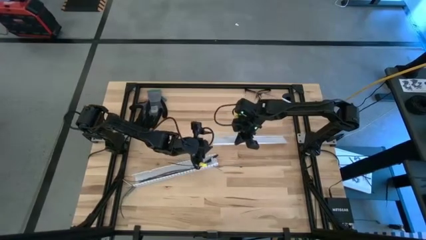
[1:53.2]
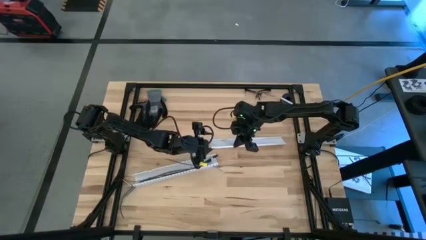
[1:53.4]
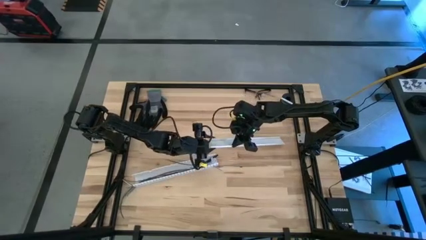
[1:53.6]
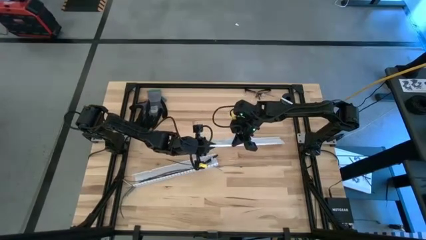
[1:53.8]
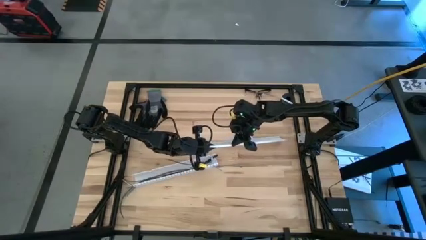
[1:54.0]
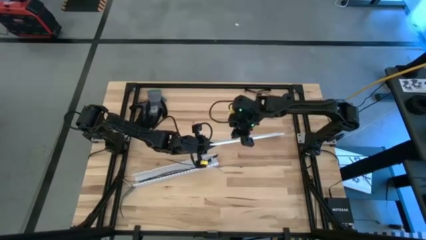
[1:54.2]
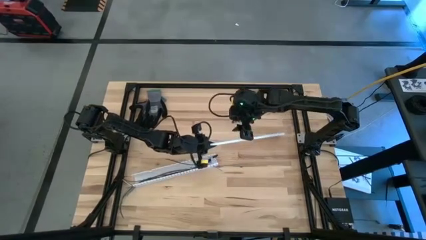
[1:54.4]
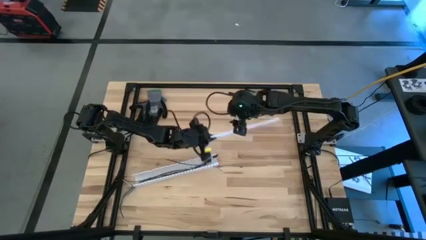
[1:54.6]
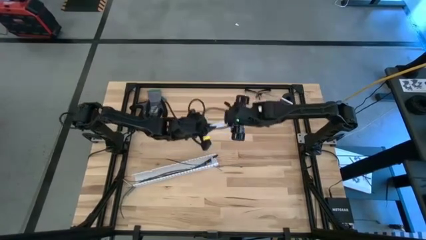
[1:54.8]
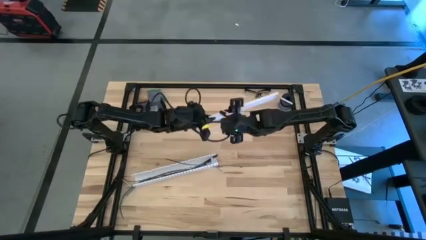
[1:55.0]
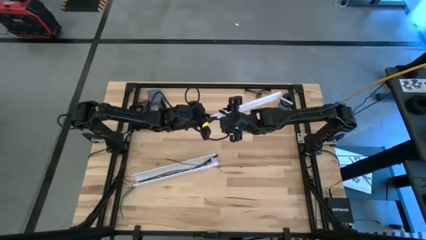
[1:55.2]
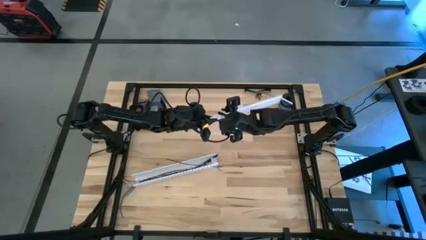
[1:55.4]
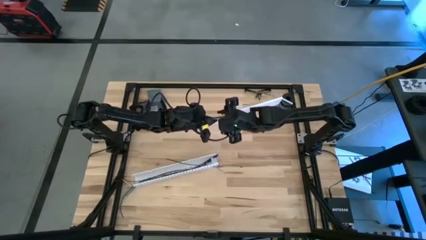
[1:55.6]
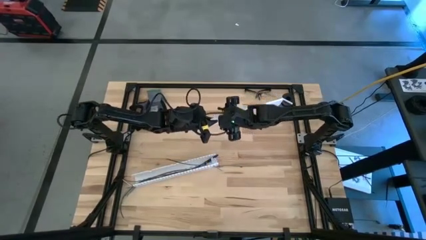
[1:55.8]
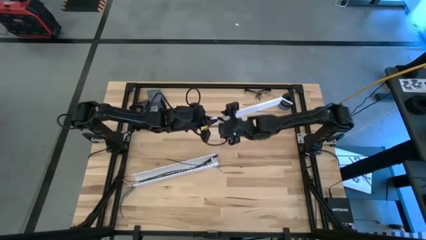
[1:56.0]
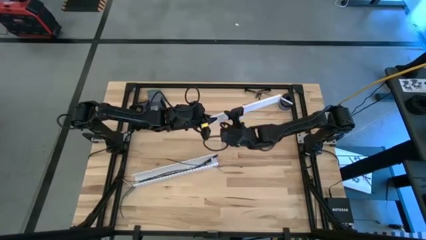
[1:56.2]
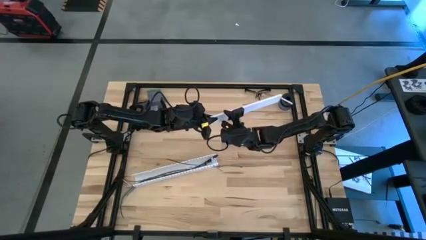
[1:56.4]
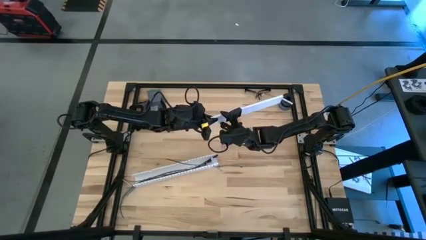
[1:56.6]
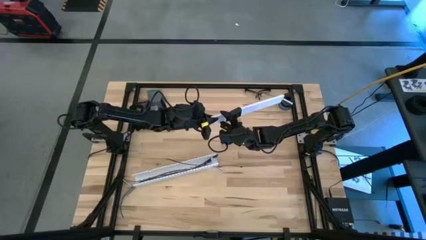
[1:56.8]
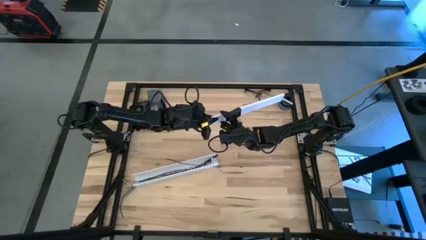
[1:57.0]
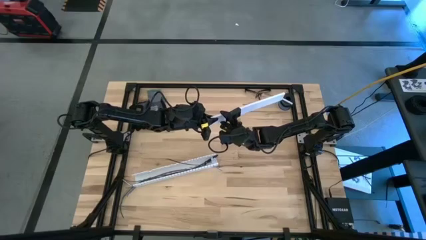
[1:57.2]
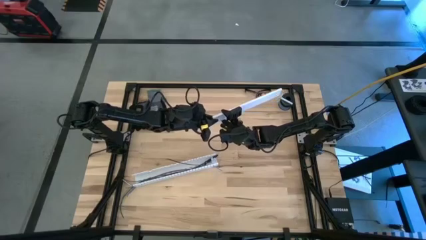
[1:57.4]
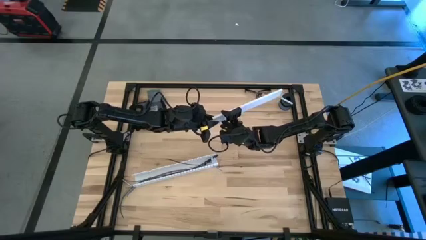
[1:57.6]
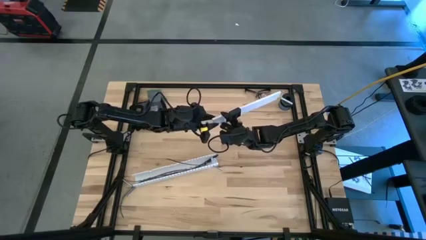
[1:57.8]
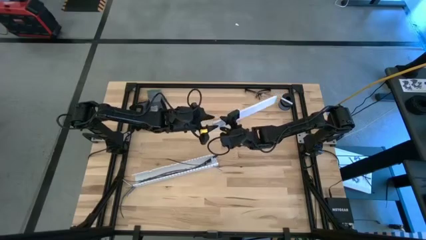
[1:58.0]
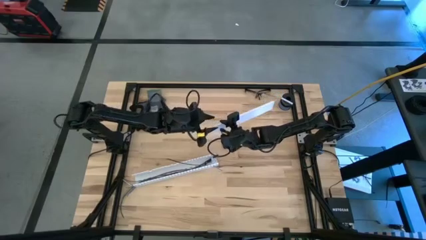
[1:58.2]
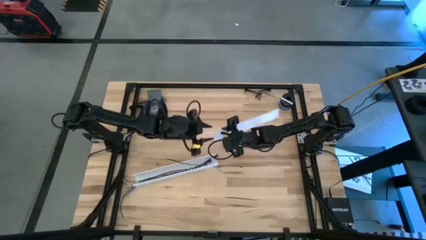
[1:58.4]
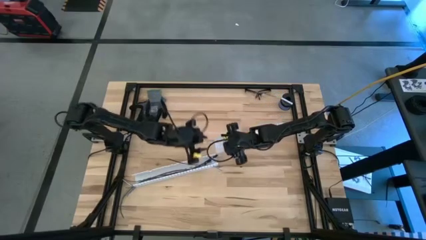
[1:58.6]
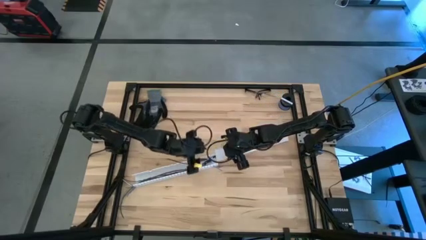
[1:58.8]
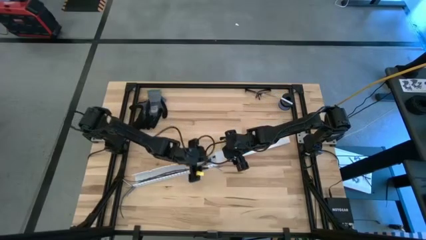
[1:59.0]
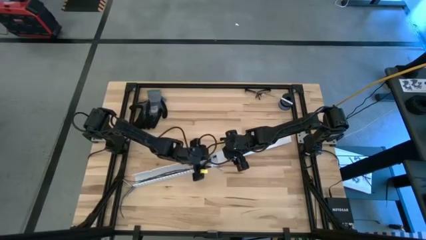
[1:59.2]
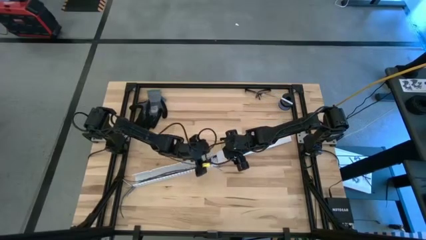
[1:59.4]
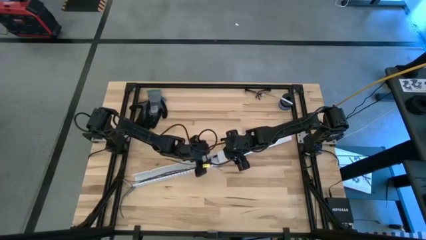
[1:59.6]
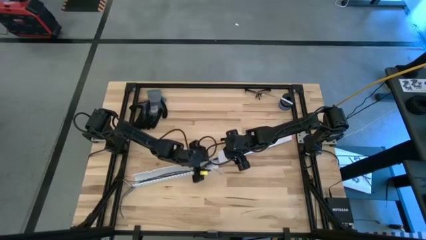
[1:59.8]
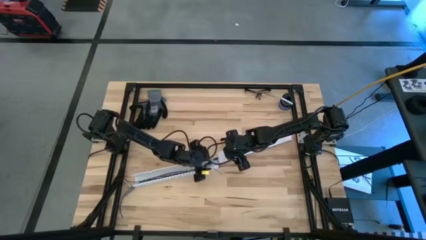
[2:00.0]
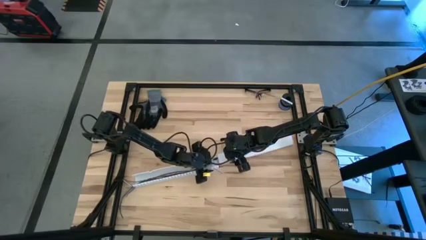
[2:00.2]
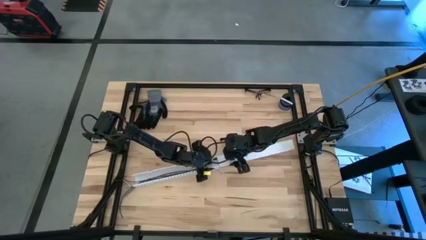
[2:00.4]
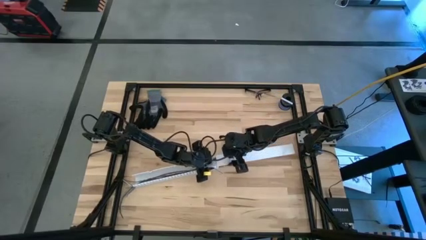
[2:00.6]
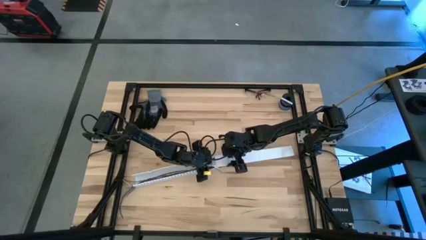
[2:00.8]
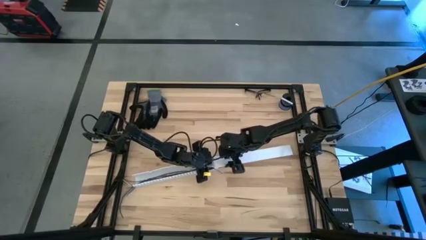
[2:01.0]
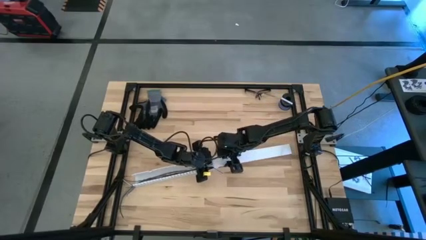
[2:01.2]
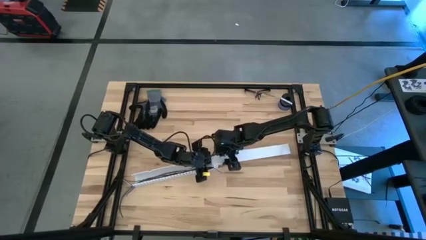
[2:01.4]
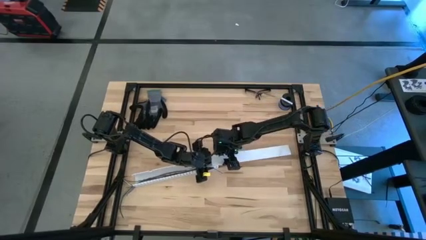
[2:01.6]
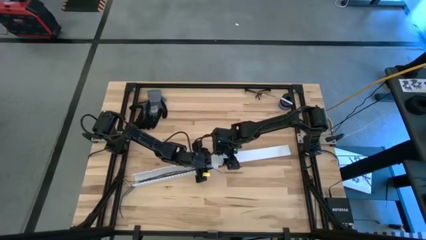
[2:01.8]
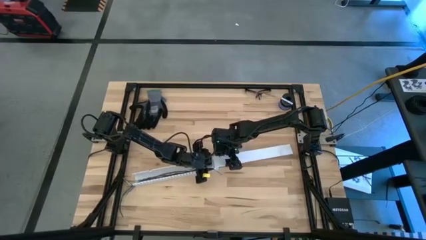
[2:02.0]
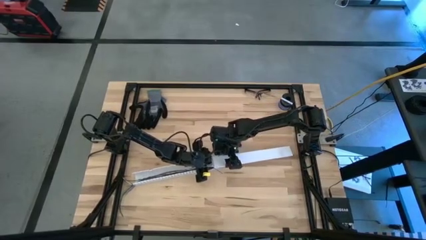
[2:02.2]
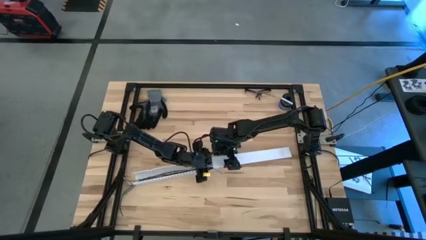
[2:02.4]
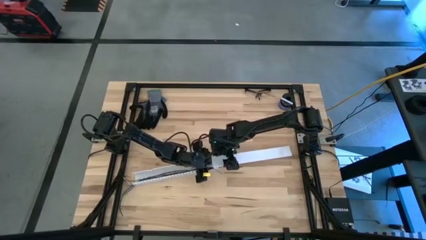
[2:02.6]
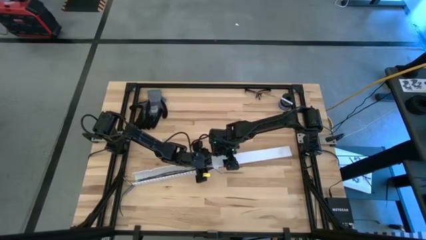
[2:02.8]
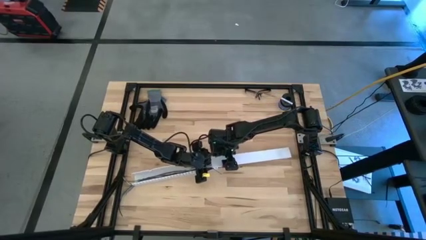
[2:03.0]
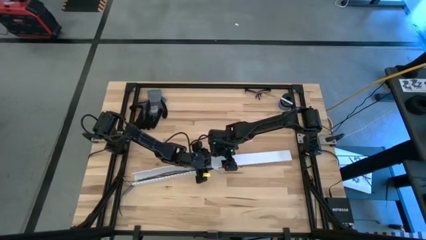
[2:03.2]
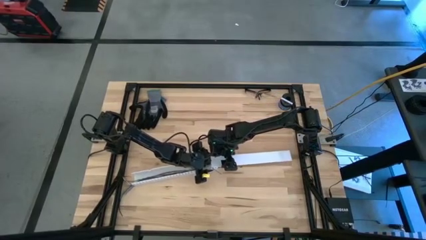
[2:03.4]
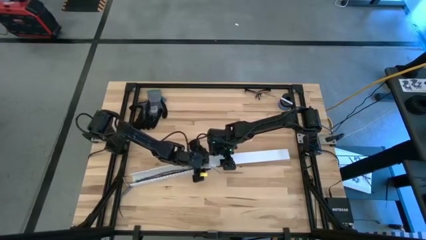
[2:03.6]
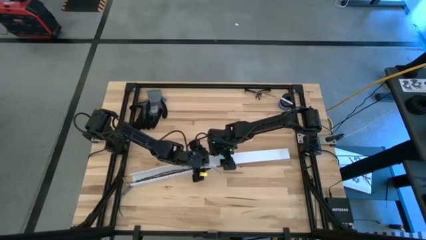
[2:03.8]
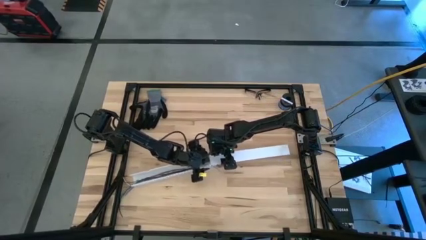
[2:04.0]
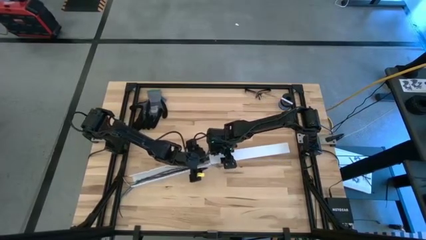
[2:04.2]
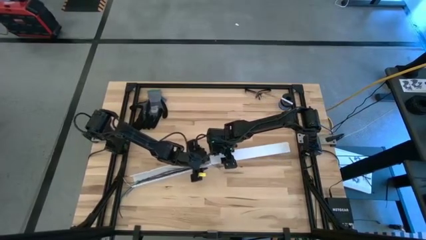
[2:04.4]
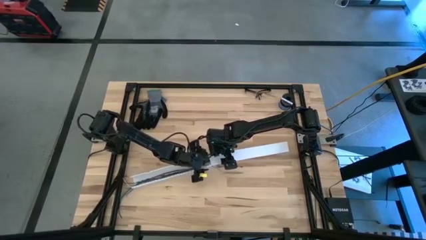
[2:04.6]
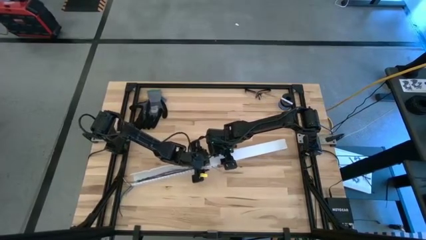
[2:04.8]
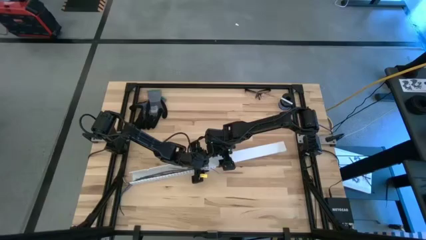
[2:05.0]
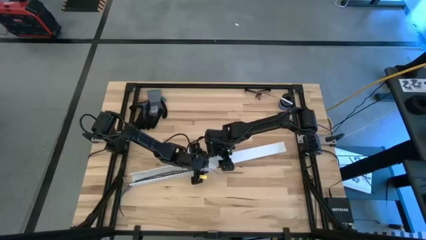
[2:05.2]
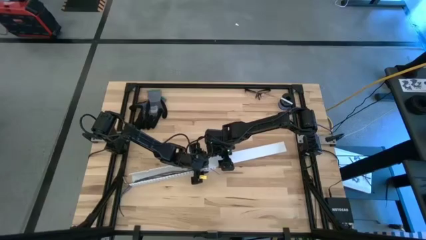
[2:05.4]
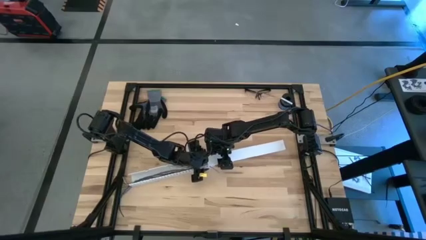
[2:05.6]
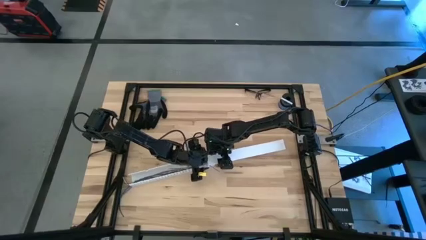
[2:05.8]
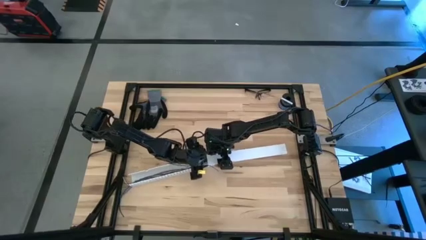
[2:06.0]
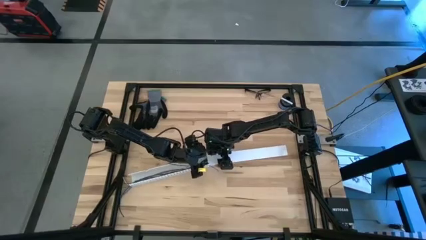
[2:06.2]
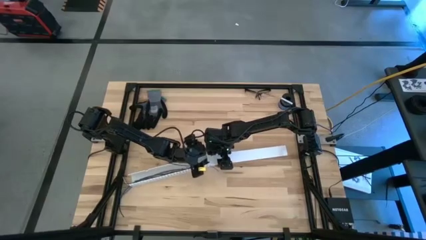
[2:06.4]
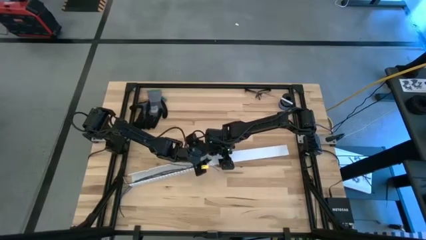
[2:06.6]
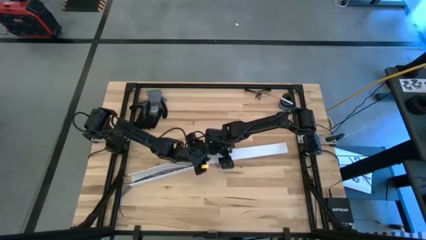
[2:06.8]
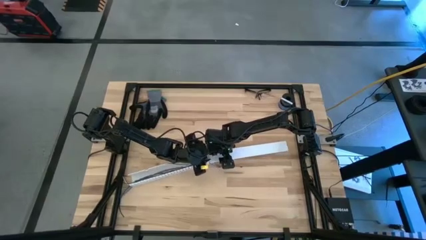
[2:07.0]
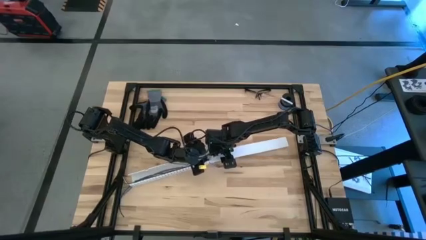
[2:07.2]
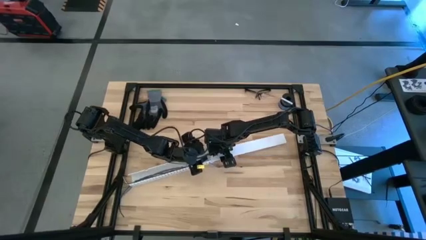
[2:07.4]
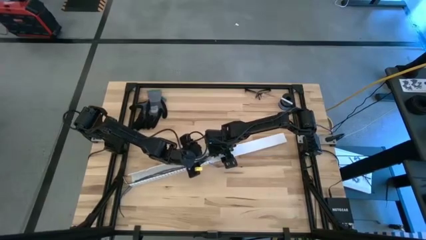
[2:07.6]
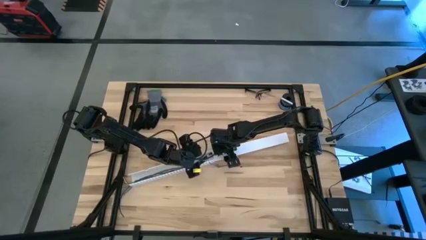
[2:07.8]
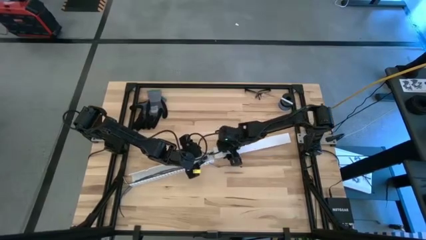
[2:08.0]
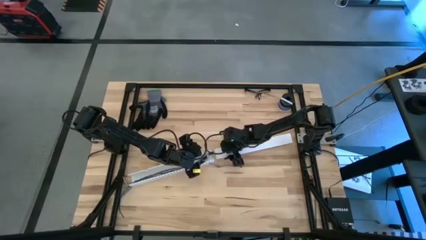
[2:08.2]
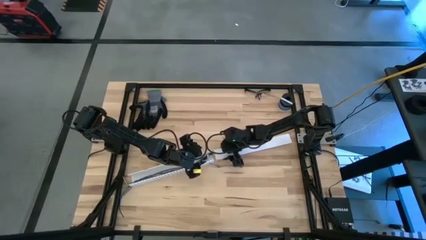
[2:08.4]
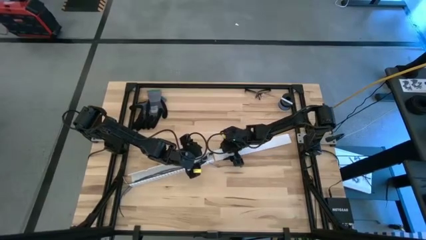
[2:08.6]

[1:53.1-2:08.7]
Task: Ziptie cables
Close the white cable duct
